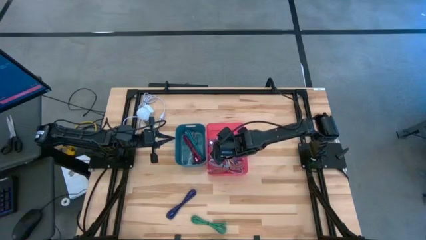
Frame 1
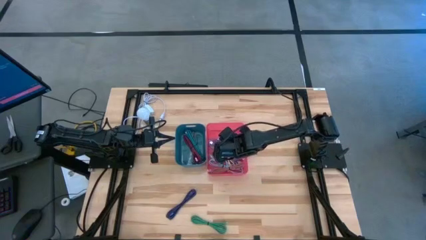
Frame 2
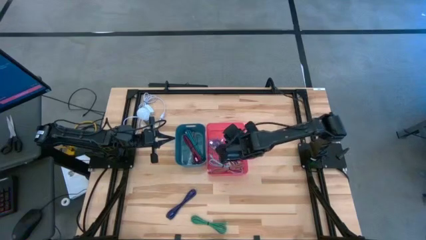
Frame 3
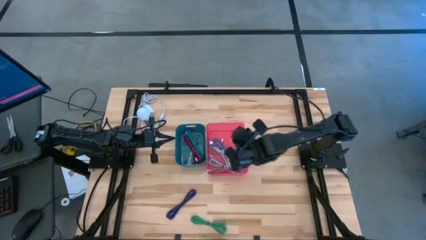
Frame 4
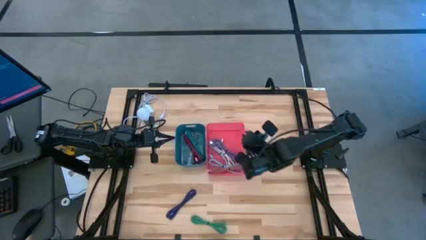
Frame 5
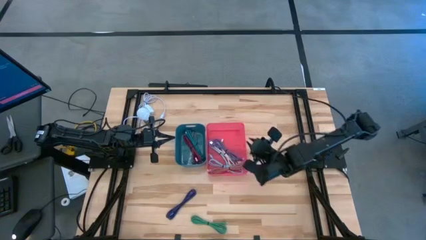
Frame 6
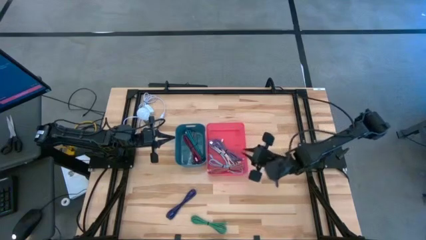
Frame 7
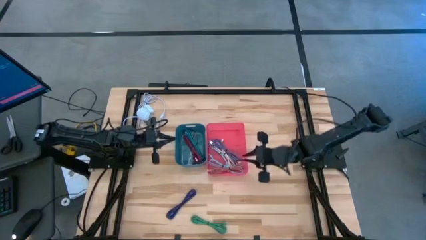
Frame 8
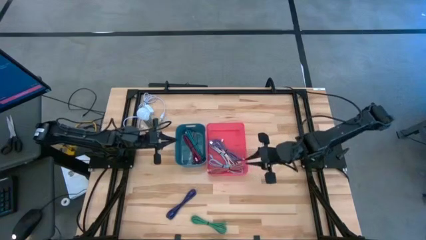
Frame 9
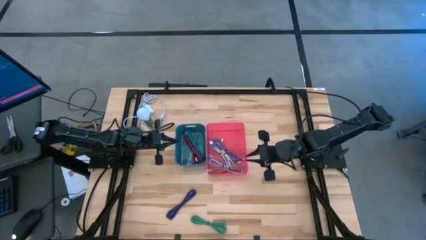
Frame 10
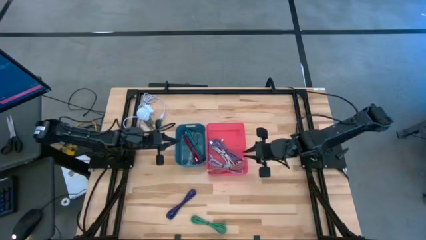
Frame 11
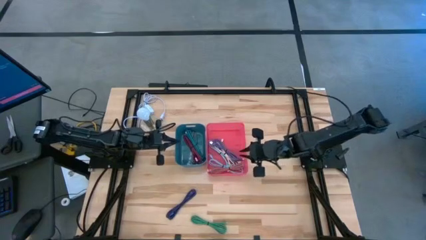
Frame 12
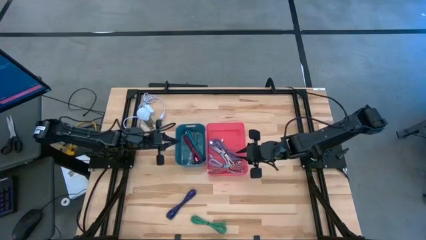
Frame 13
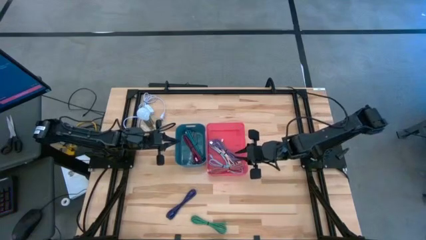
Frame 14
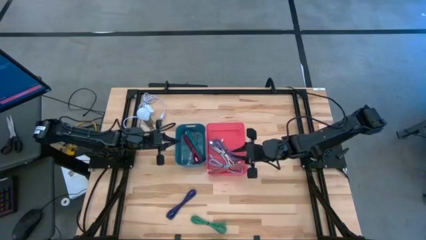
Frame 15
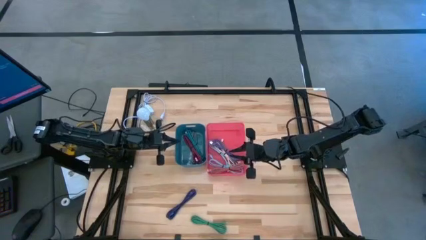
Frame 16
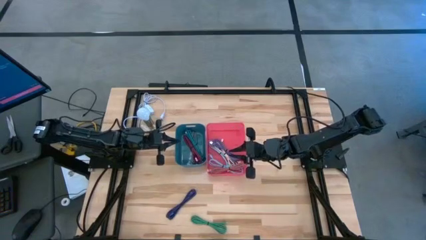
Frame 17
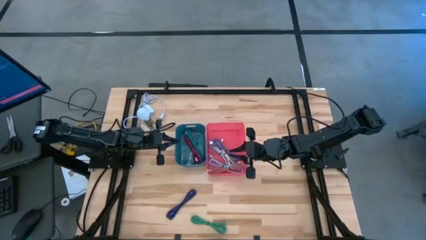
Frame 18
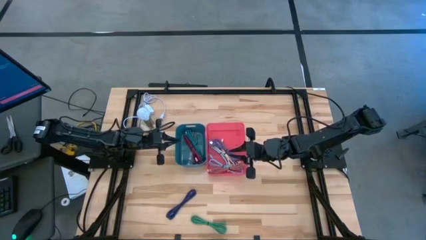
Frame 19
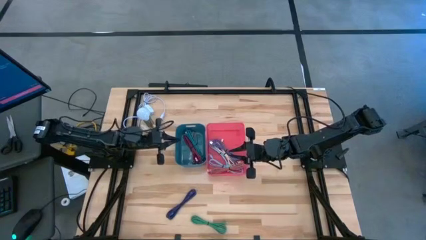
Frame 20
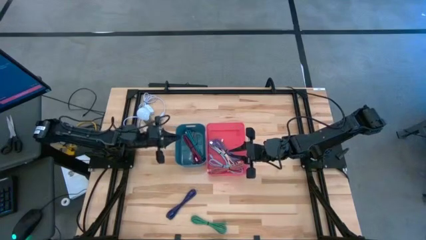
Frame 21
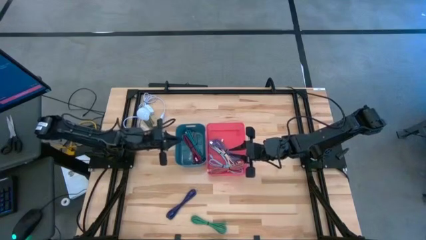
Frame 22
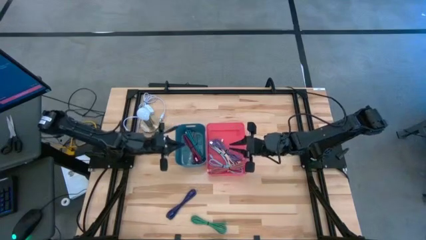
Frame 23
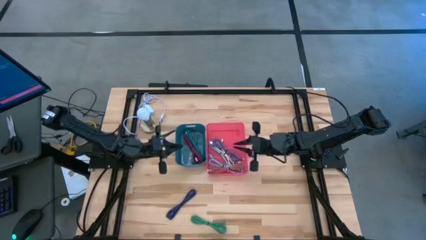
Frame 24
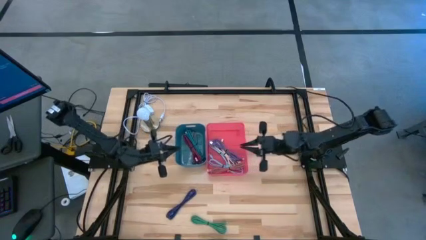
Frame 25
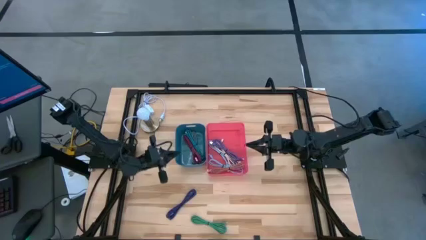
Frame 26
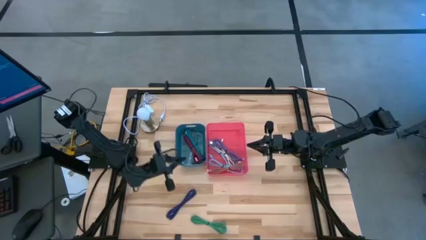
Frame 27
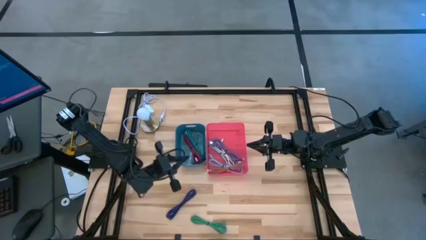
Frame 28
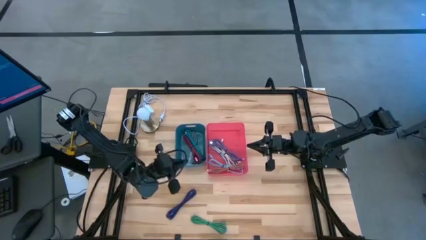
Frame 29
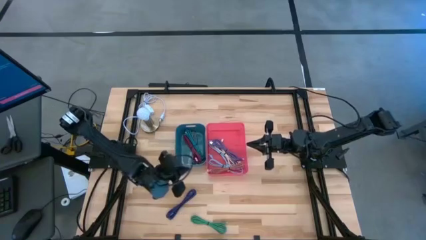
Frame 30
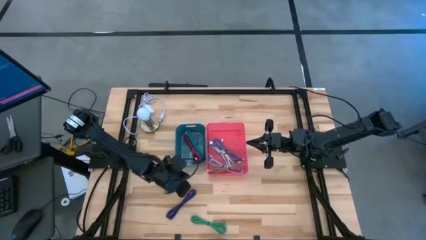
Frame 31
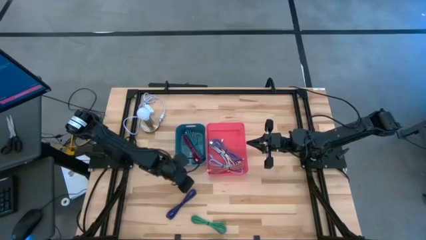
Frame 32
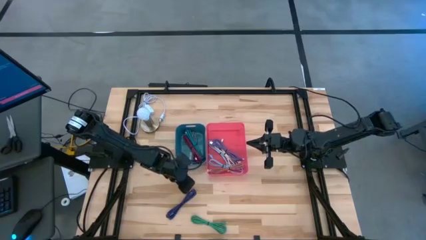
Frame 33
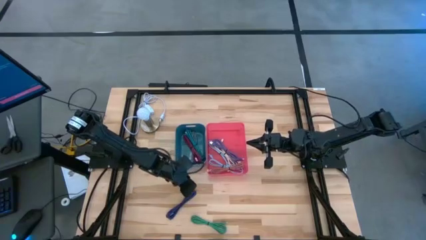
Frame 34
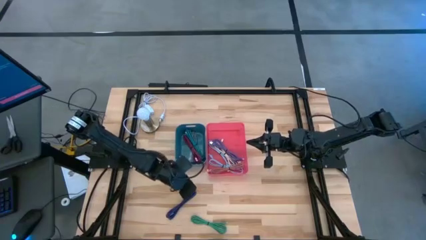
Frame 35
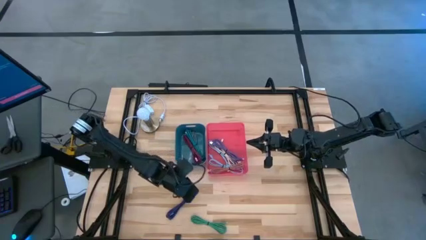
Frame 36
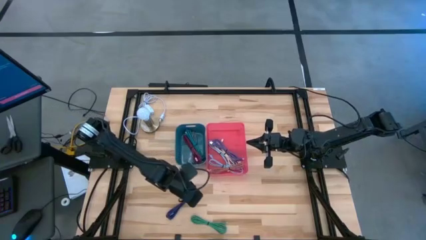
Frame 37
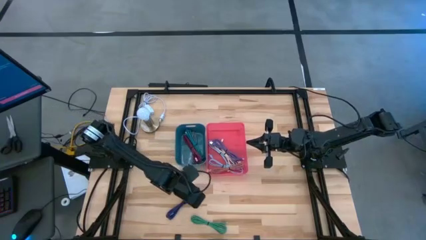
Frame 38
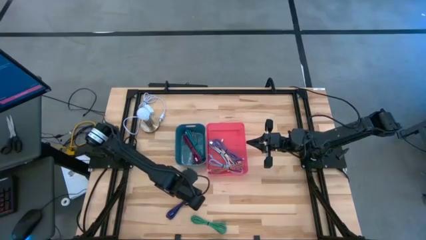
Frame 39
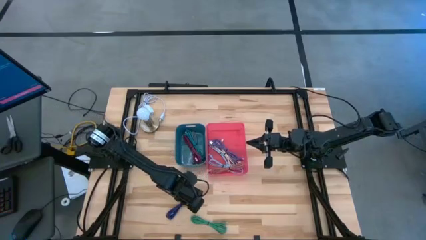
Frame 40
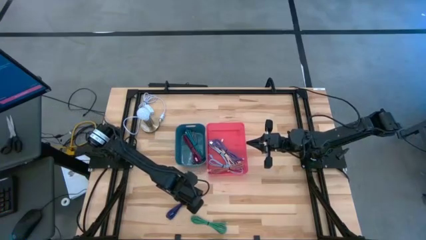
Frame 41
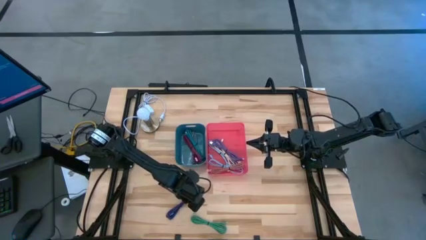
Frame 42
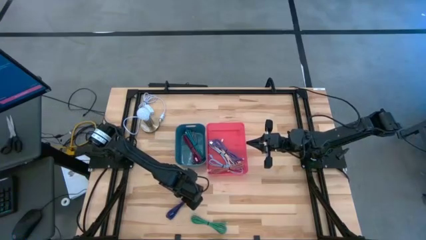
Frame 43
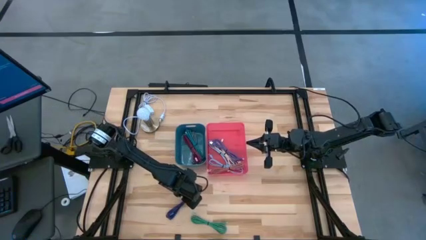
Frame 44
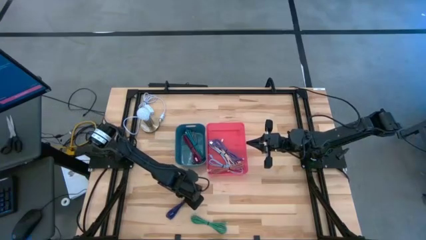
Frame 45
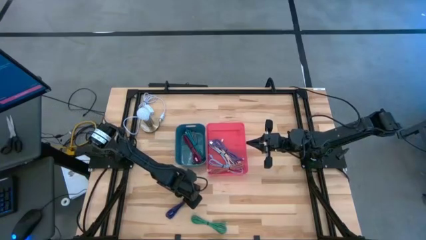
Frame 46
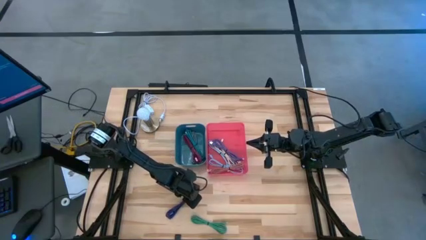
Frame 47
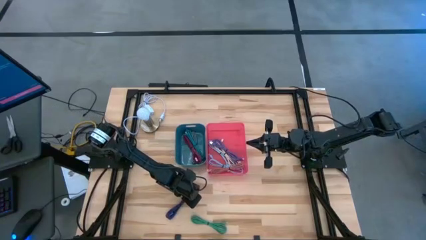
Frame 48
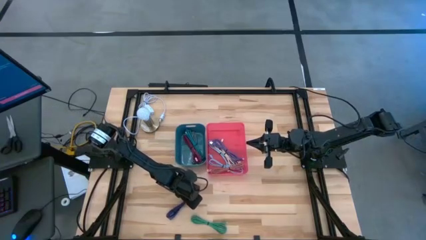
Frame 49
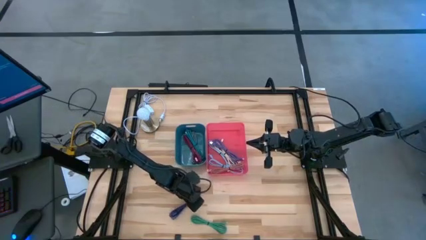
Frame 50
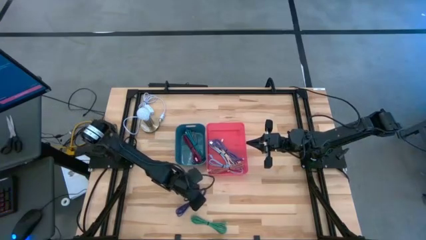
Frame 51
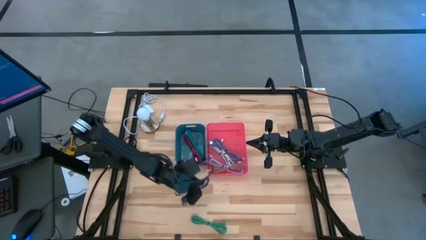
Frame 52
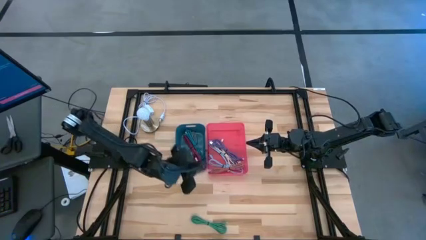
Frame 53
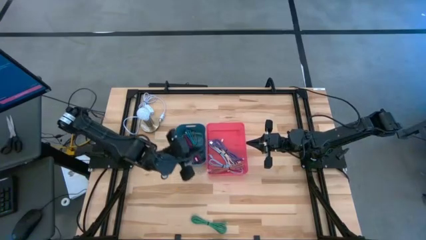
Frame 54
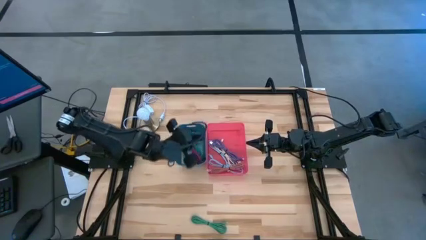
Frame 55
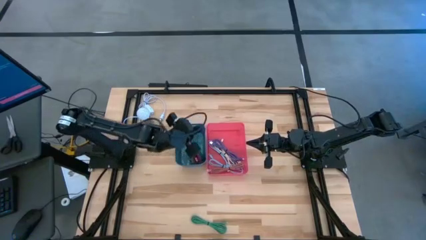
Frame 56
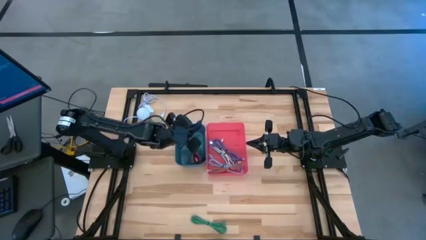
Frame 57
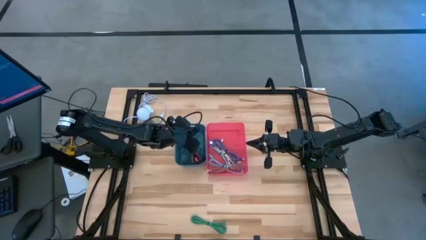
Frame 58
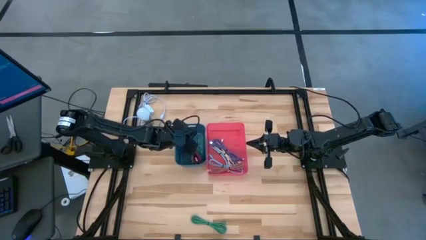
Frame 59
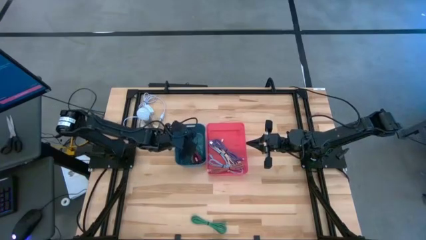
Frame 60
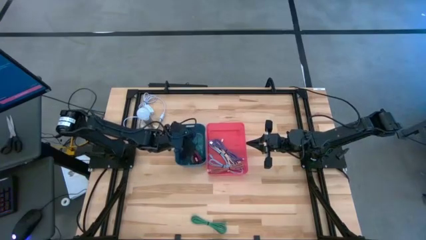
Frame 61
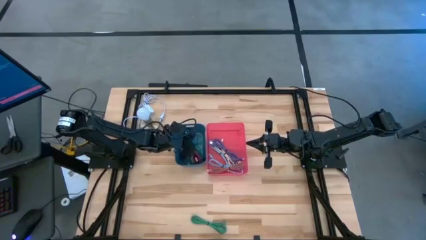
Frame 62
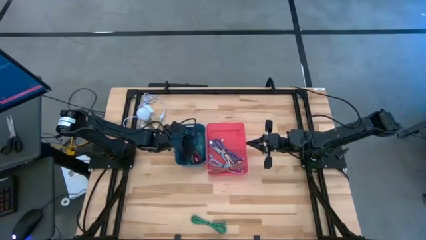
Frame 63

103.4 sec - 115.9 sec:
Task: Pick & Place USB Port
Put the patterned violet charger cable into the blue bin

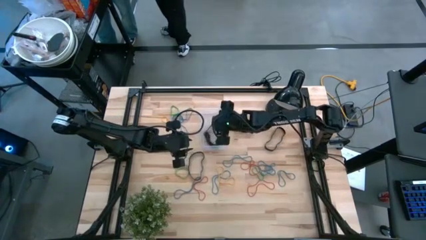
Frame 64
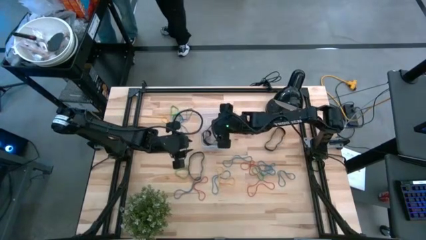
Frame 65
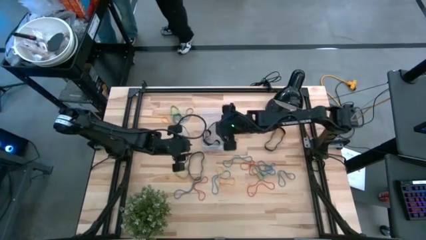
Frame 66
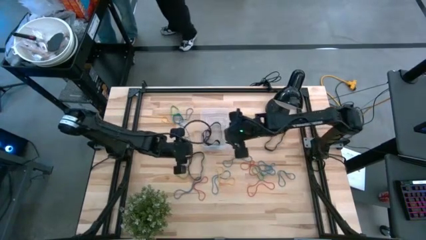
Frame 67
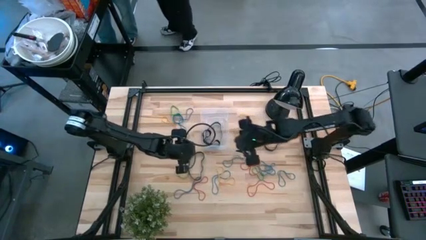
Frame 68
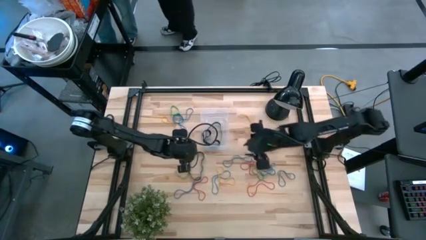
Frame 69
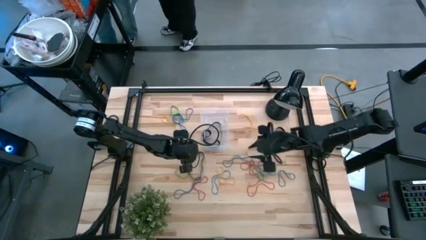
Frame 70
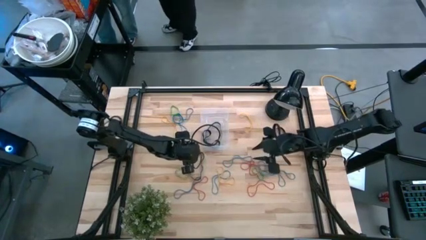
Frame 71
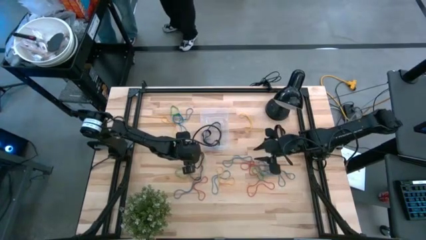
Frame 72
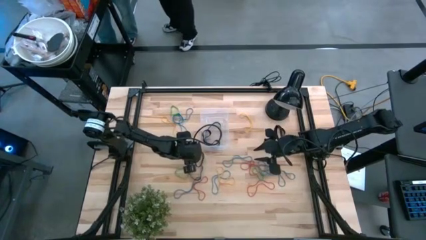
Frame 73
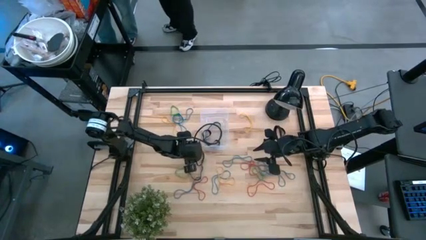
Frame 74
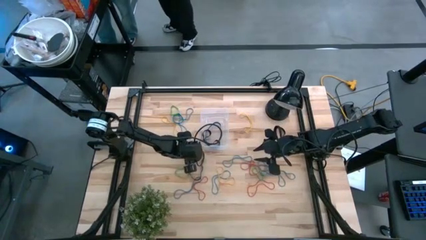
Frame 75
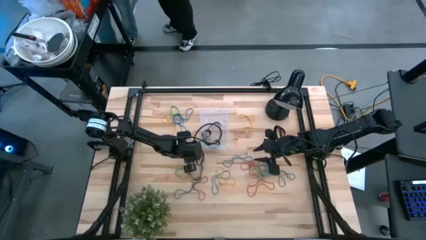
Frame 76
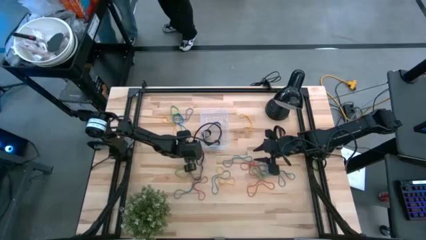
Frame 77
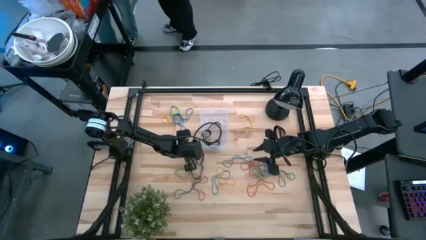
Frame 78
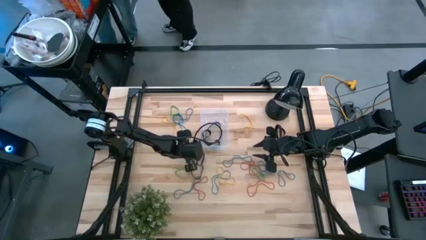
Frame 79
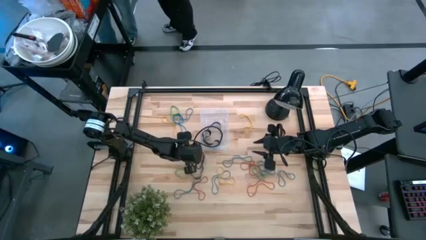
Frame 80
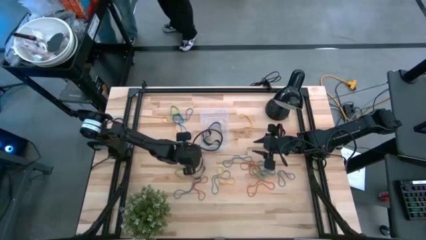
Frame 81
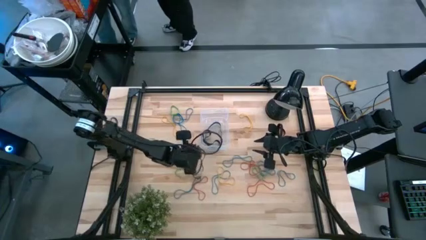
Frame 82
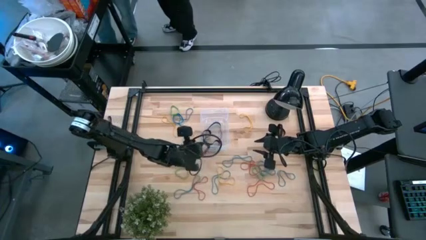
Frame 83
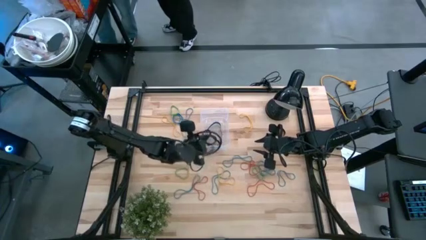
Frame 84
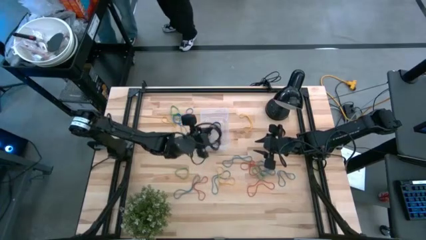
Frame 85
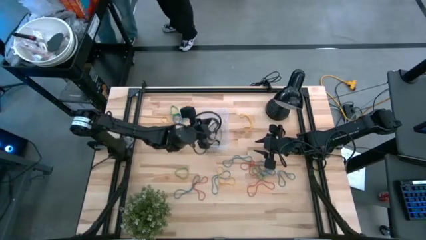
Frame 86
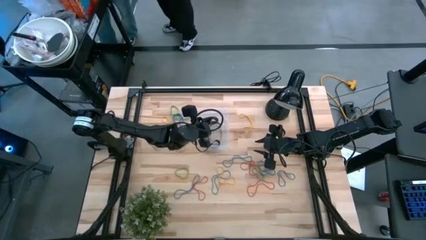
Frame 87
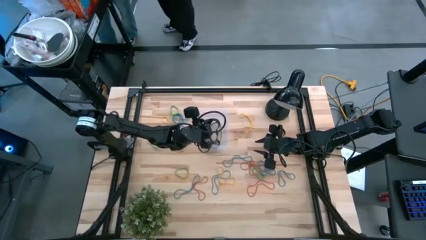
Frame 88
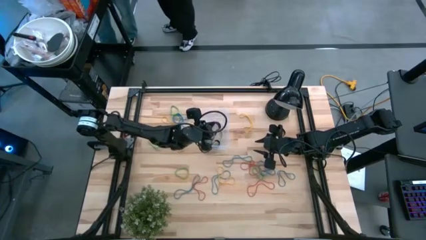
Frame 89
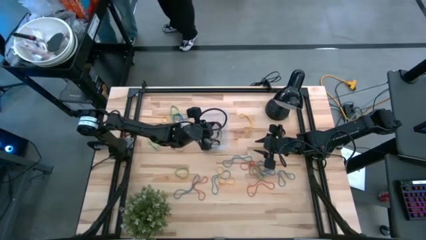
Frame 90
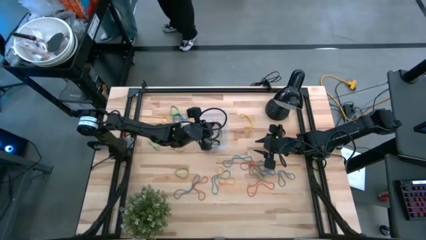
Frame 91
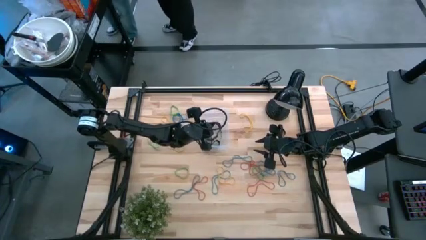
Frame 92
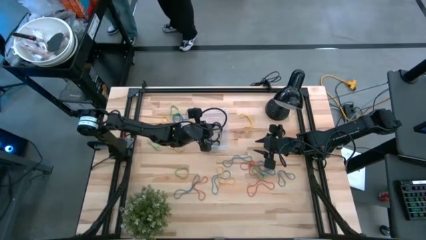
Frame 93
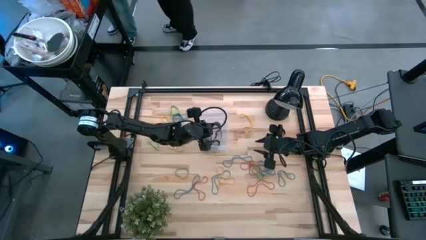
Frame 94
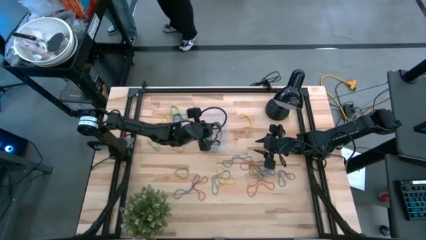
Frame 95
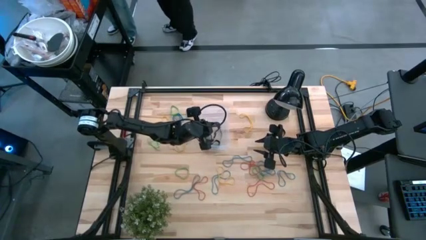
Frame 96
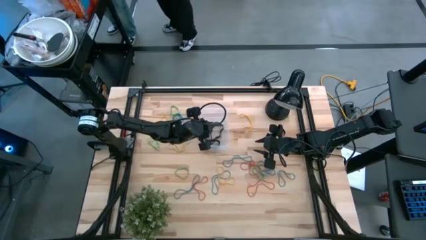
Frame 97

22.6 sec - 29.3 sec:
Task: Pick and place rubber bands into bin
Put the black rubber band into the transparent bin
